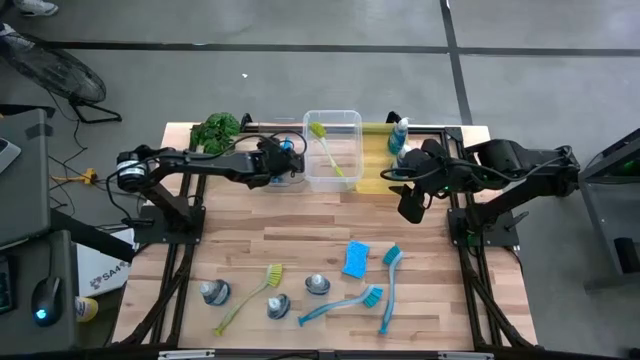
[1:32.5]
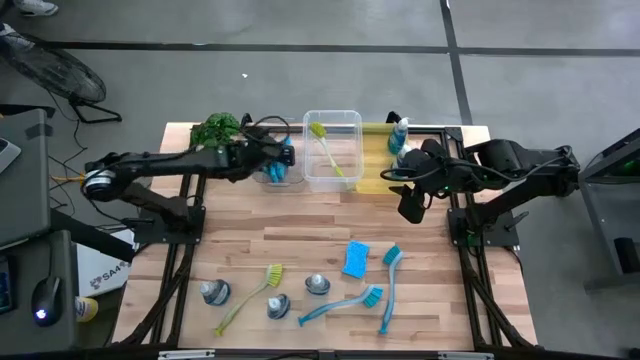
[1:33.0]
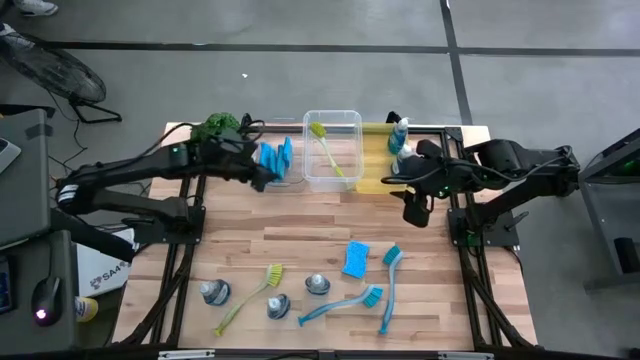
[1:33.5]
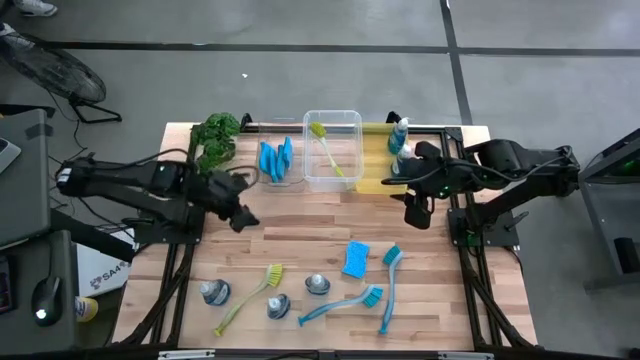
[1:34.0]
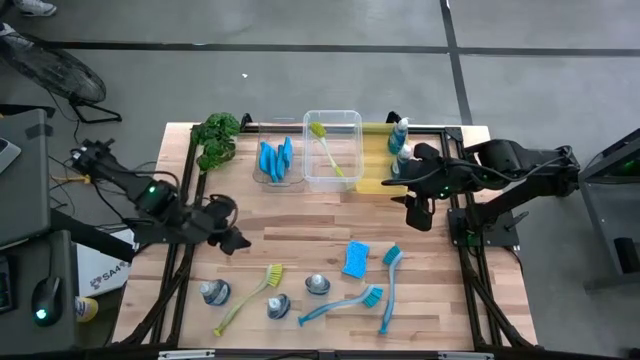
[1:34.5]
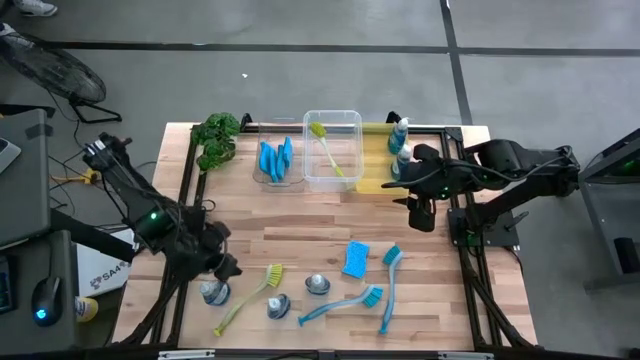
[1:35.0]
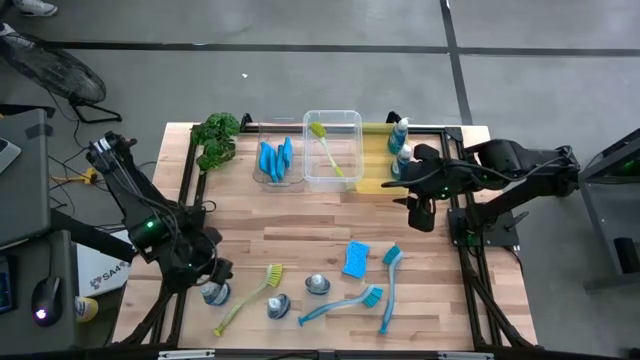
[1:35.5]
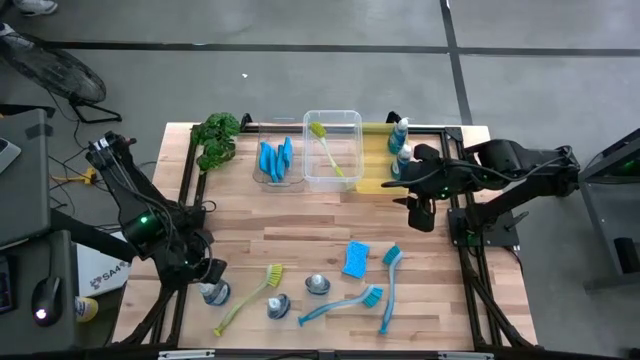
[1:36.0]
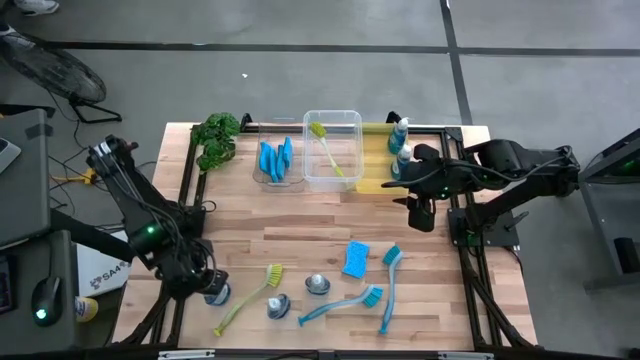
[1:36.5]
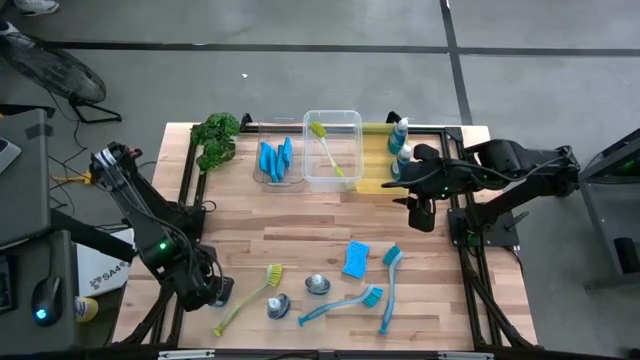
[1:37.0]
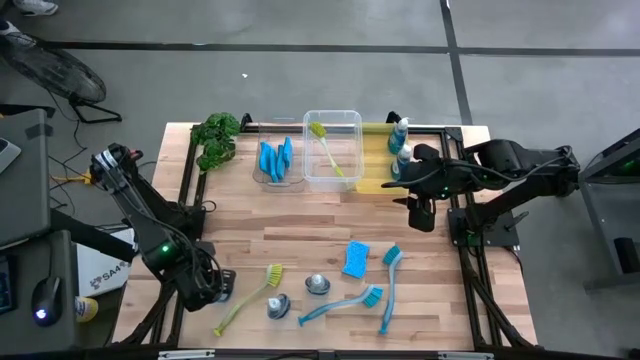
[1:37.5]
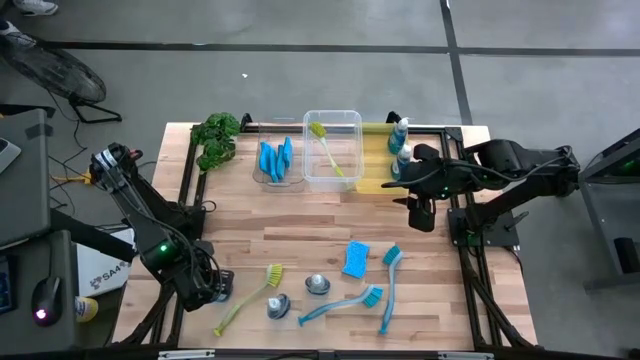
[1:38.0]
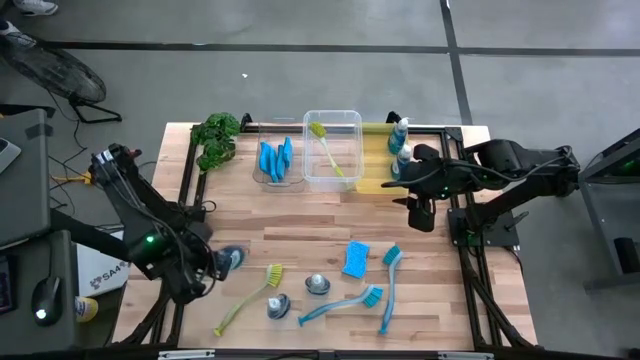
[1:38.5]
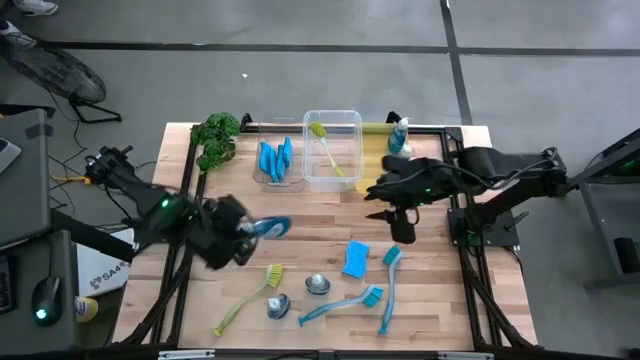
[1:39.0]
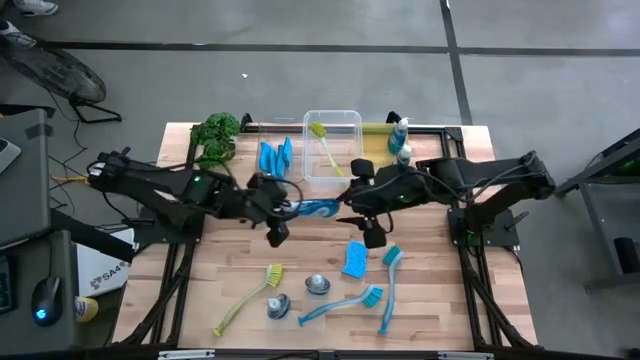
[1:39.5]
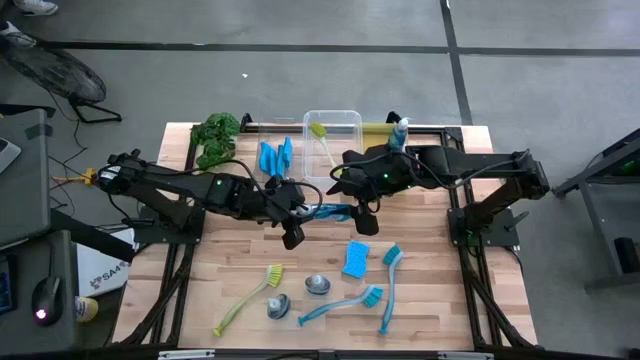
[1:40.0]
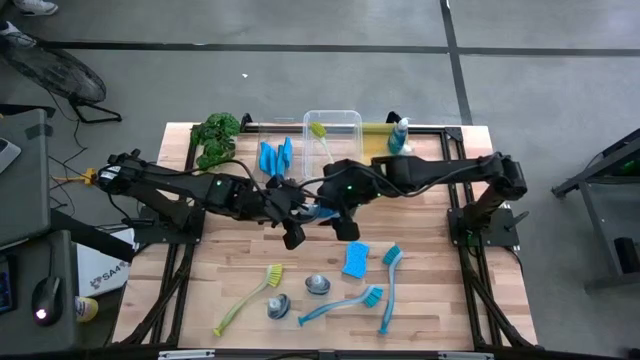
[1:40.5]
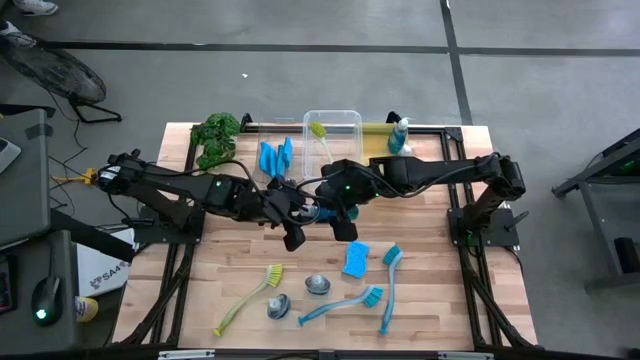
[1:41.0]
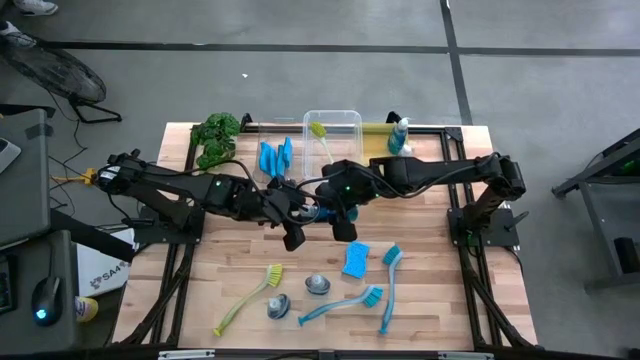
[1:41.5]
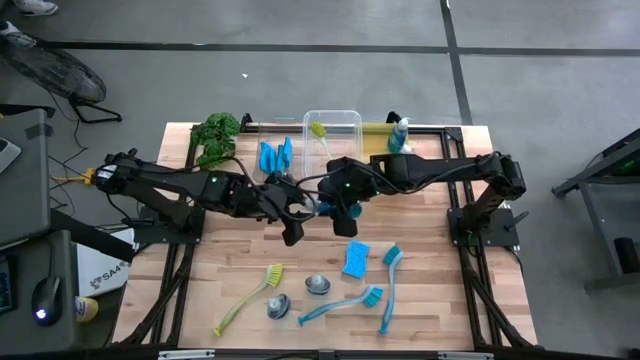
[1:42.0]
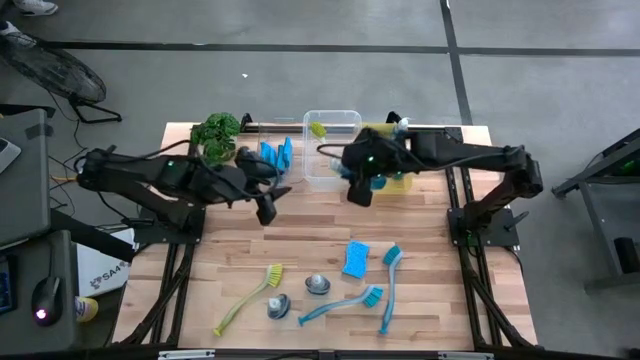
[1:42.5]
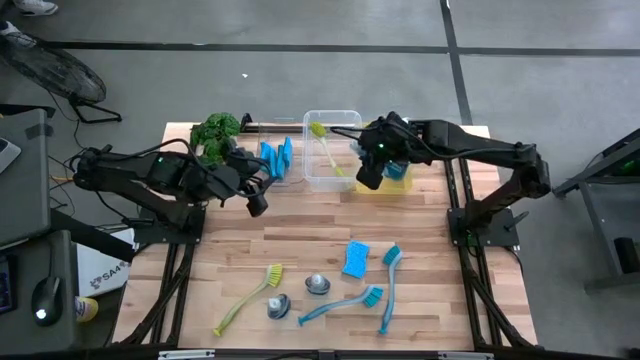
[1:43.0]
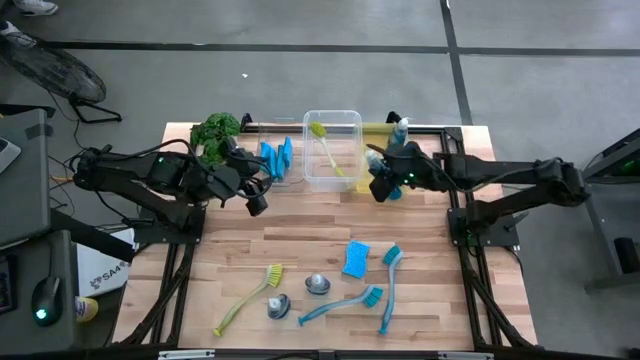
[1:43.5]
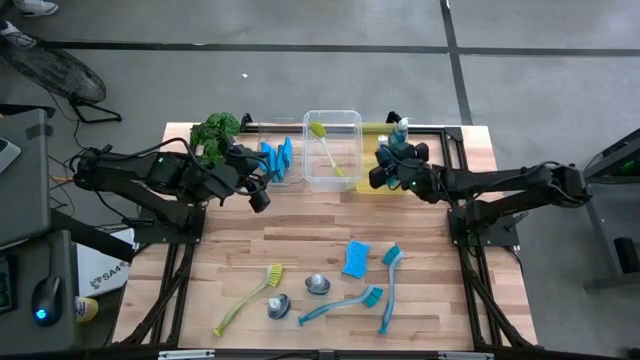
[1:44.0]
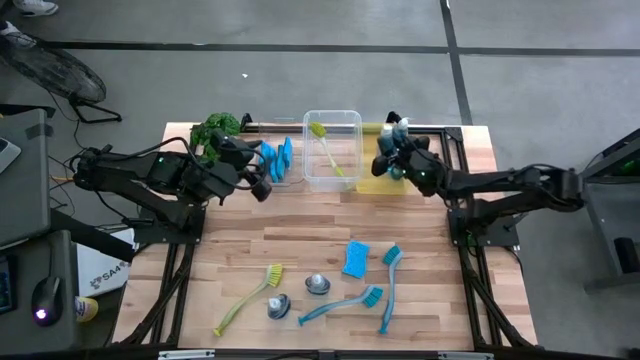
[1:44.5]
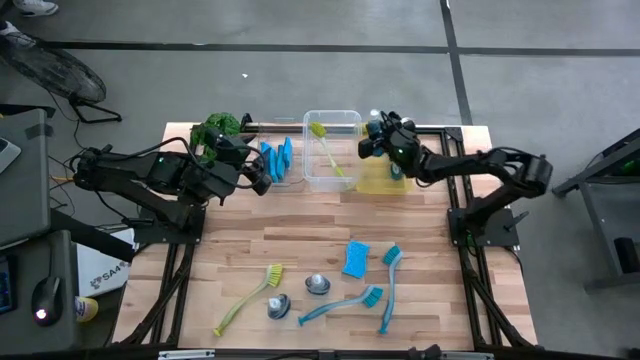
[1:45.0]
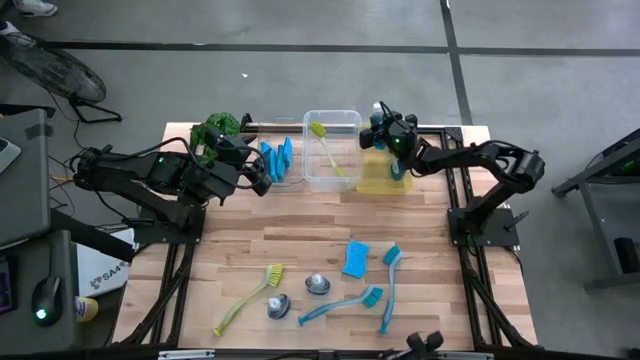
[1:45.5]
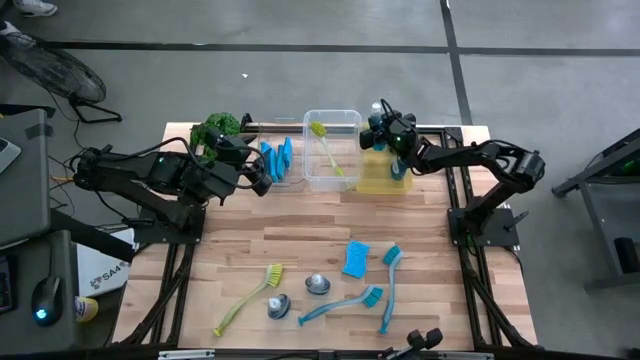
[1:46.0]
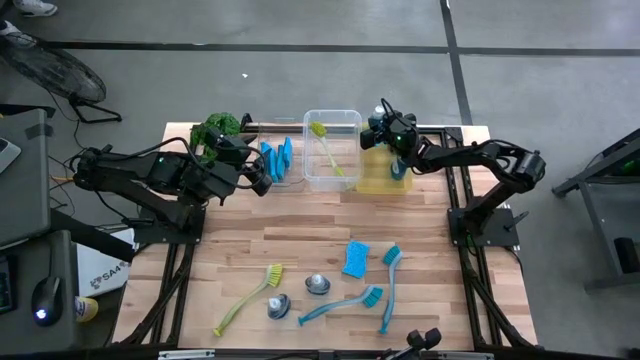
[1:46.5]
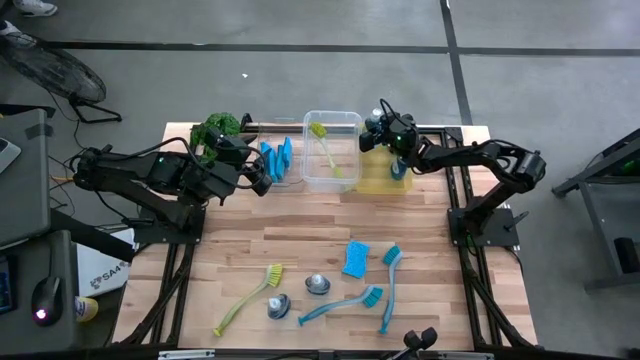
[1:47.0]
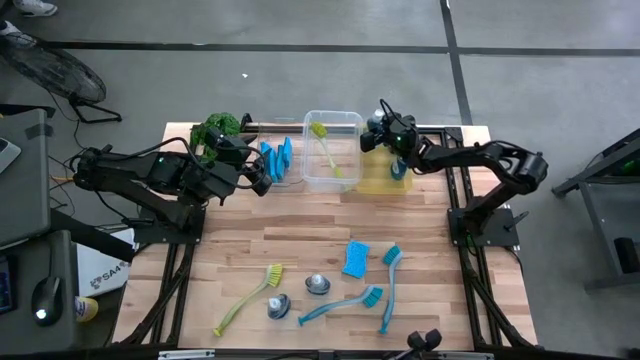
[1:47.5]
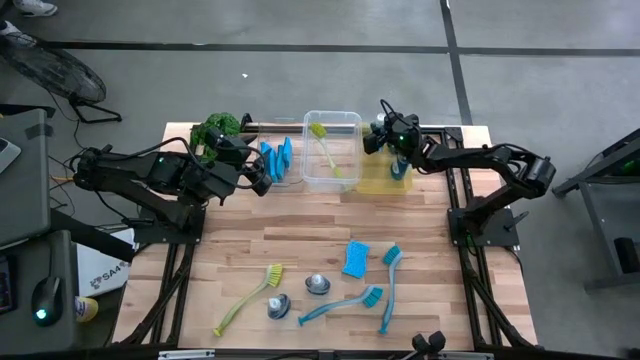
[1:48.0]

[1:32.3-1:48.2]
Task: Pick & Place Kitchen Sink Supplies
Put the left dishwashing liquid into the yellow bin

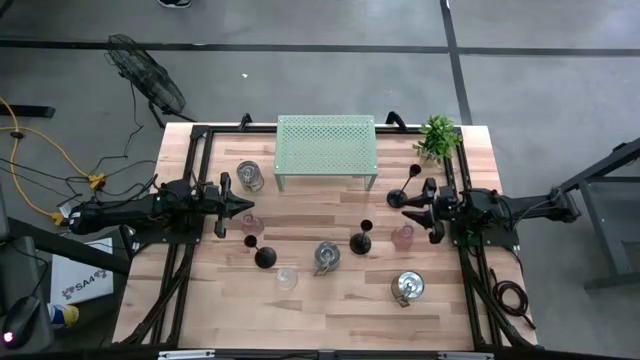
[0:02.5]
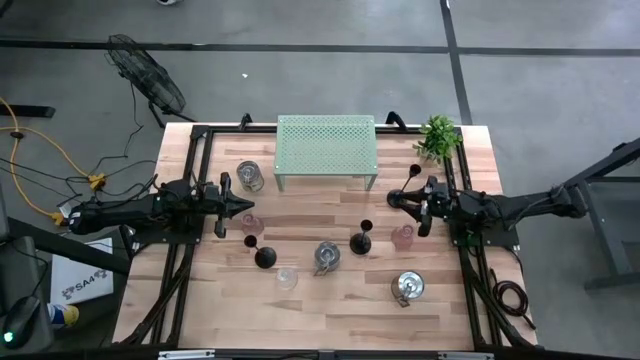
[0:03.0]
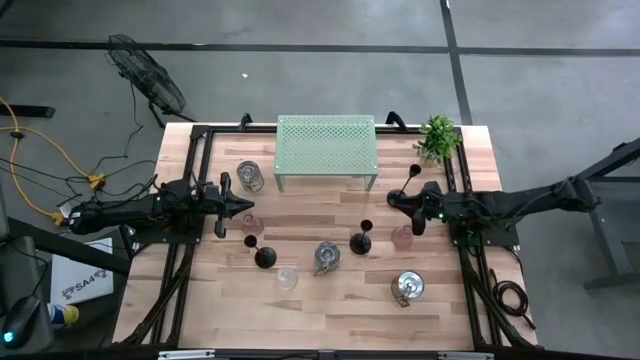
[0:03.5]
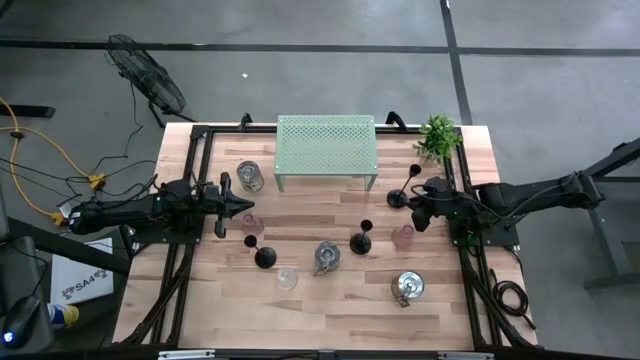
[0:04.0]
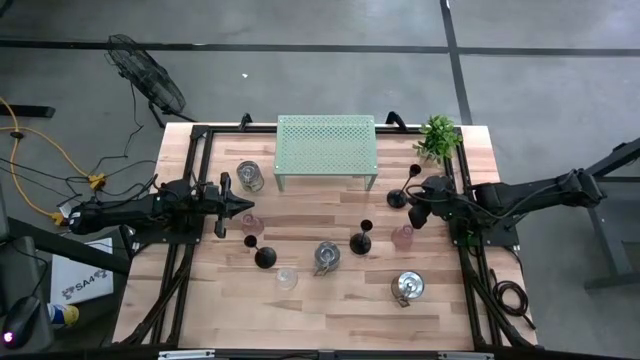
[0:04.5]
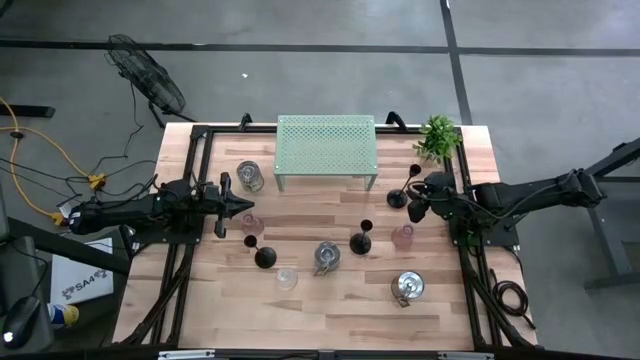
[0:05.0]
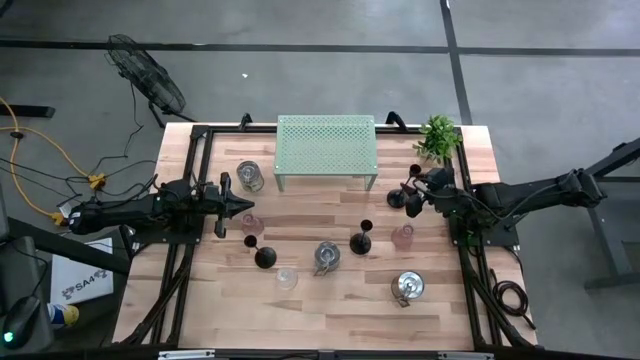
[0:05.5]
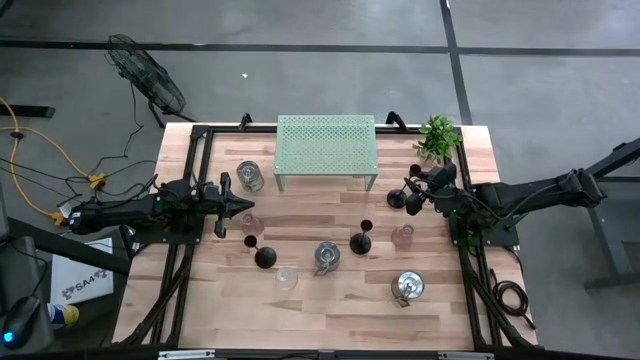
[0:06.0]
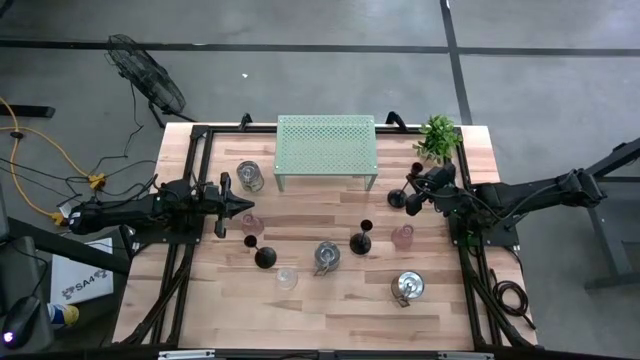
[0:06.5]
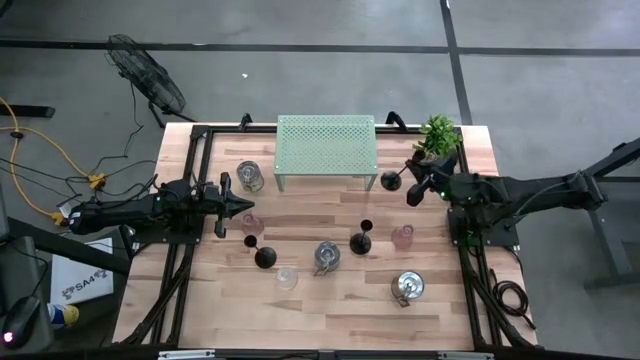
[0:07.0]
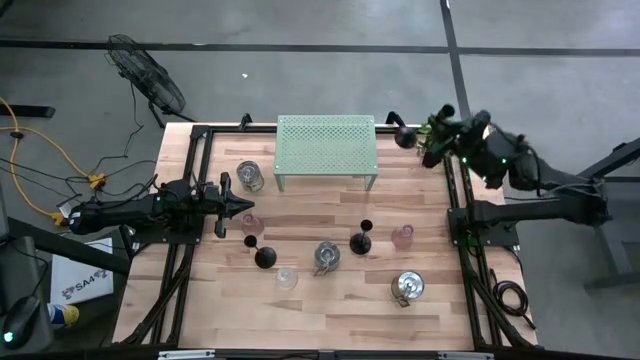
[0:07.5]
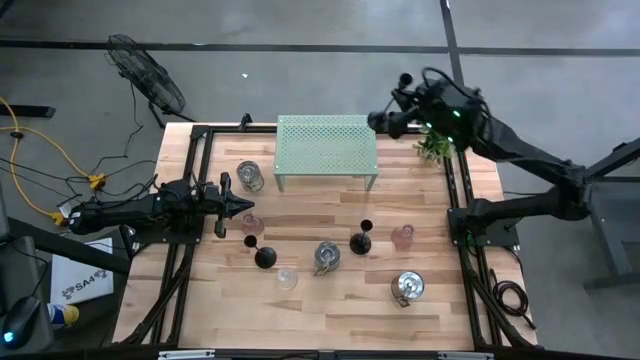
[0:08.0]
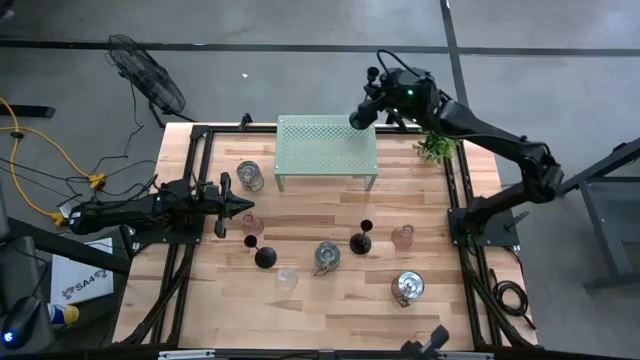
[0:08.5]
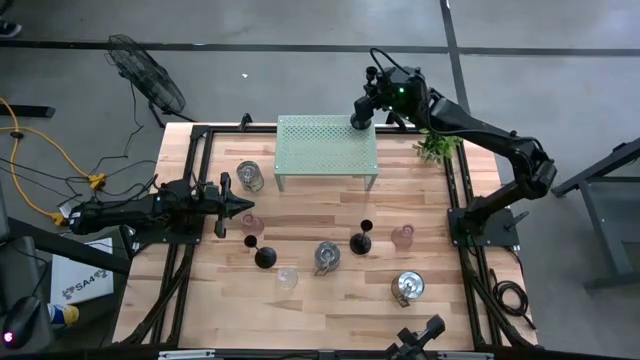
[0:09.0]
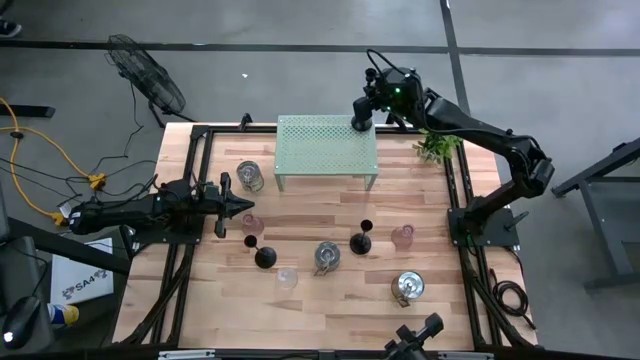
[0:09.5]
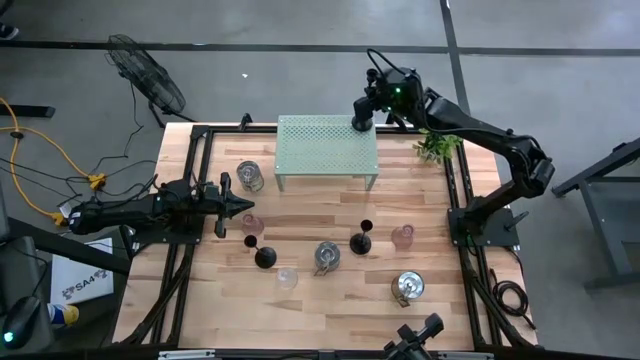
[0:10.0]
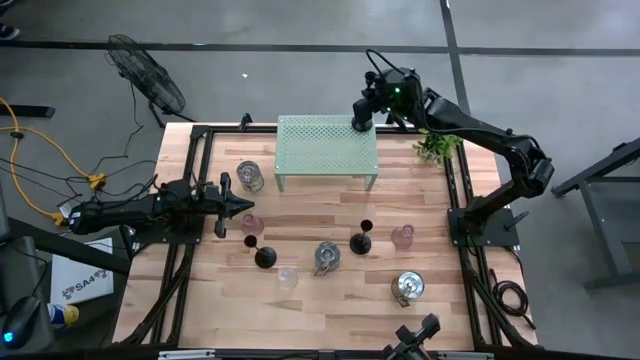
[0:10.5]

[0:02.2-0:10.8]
Task: Pick & Place candle stick holders
Put the top black candle holder on the shelf
